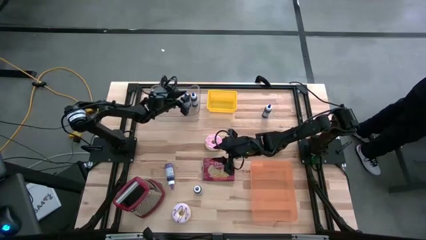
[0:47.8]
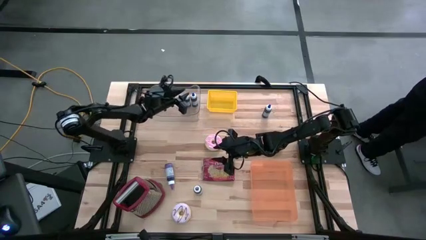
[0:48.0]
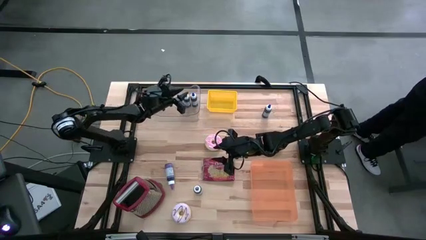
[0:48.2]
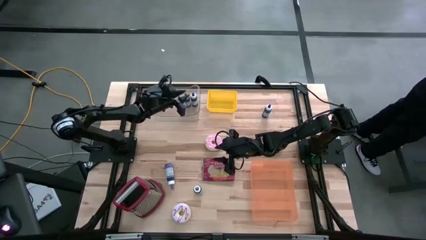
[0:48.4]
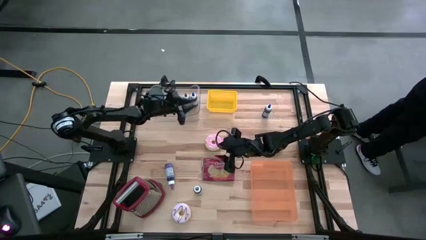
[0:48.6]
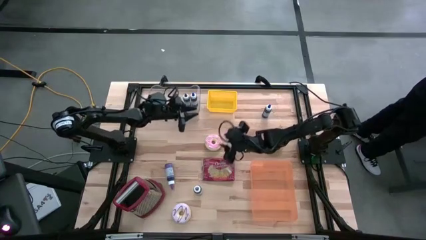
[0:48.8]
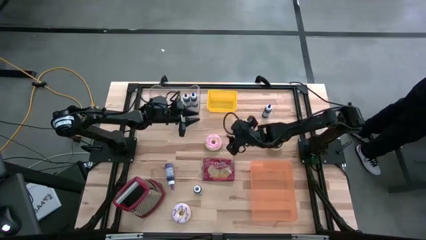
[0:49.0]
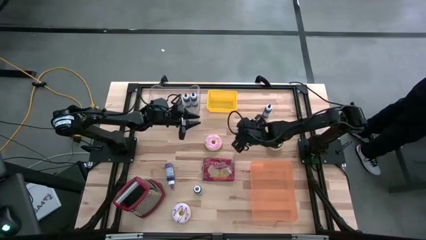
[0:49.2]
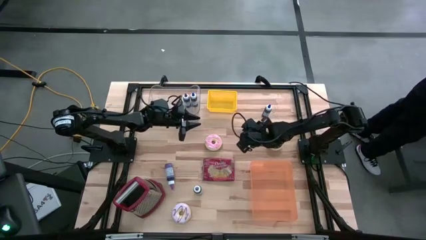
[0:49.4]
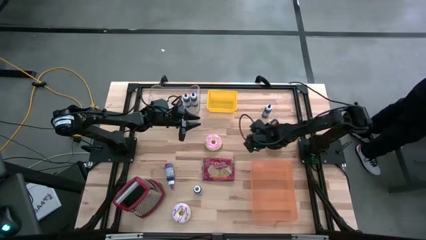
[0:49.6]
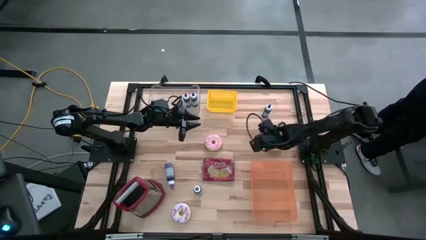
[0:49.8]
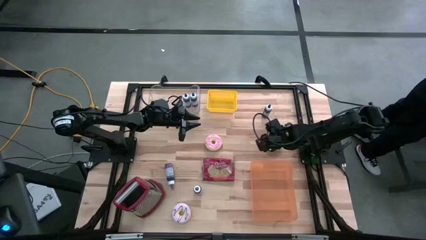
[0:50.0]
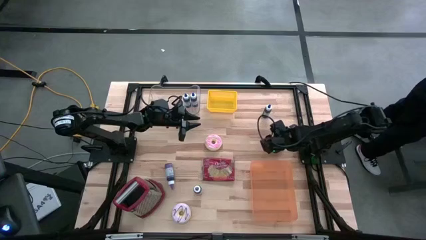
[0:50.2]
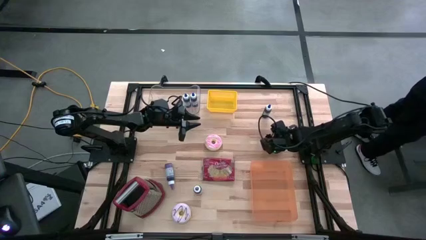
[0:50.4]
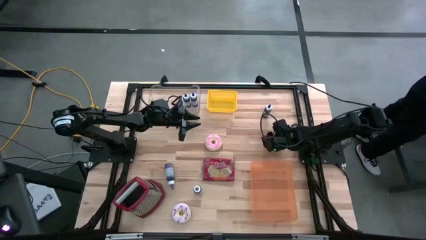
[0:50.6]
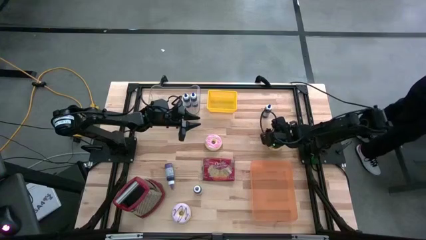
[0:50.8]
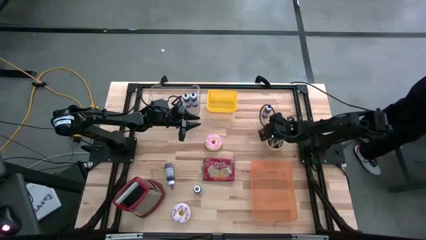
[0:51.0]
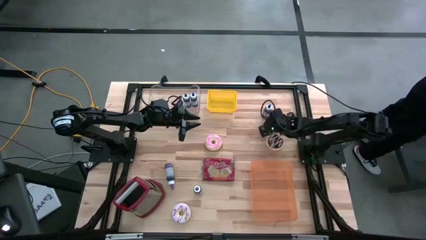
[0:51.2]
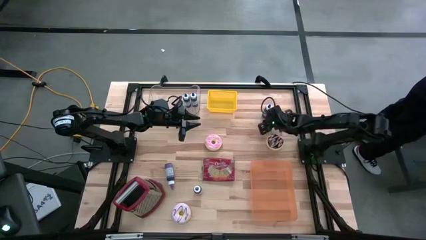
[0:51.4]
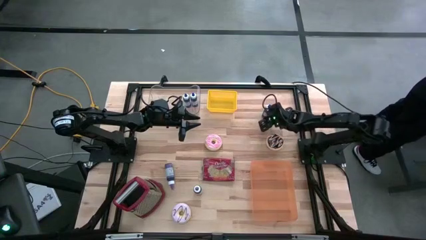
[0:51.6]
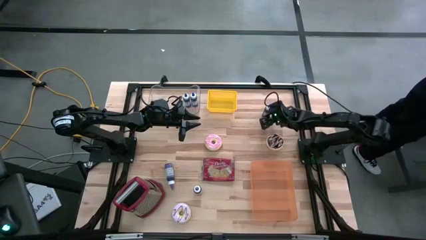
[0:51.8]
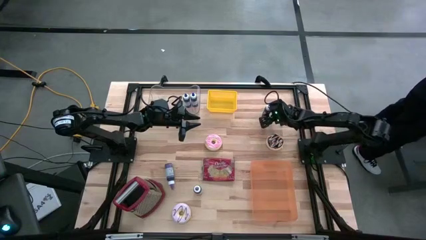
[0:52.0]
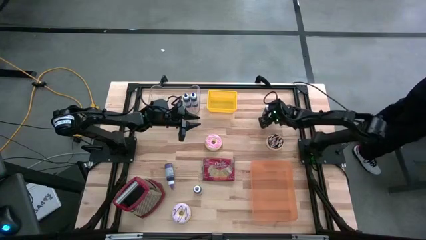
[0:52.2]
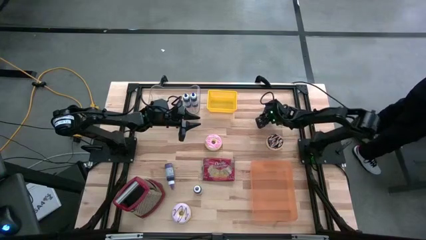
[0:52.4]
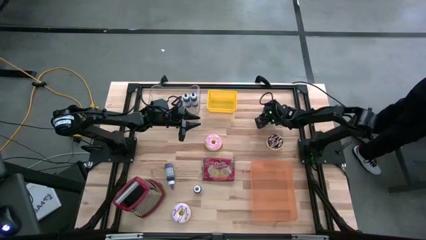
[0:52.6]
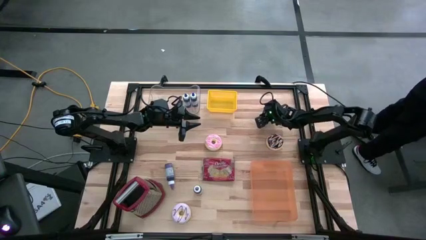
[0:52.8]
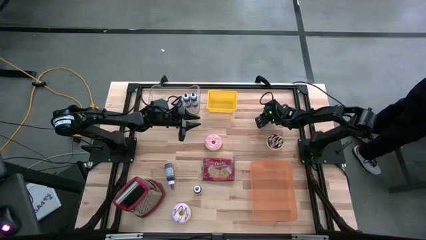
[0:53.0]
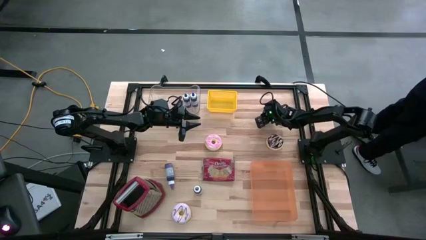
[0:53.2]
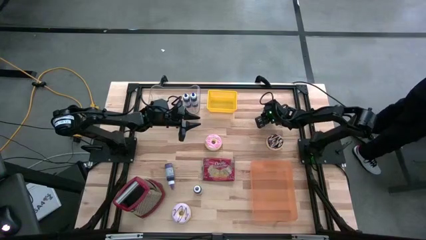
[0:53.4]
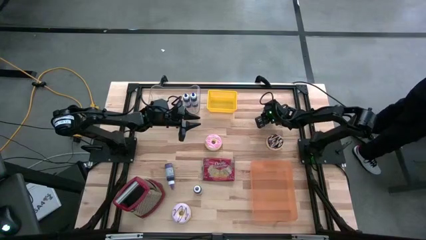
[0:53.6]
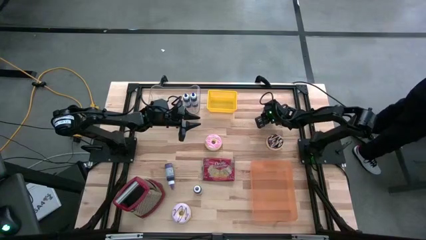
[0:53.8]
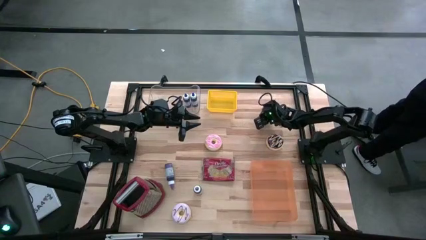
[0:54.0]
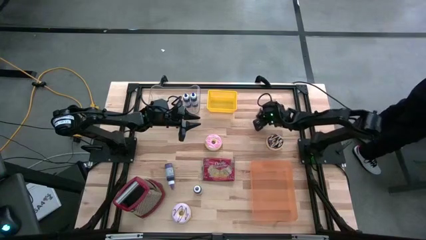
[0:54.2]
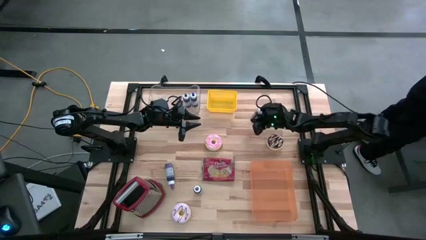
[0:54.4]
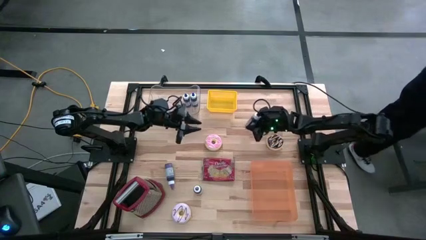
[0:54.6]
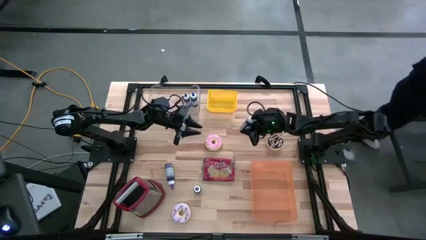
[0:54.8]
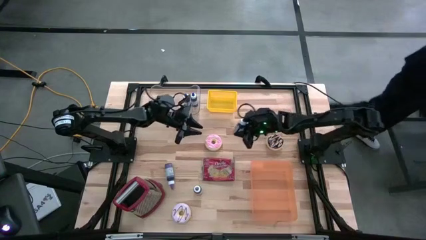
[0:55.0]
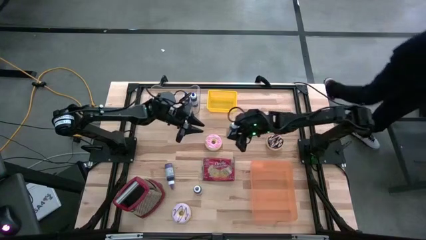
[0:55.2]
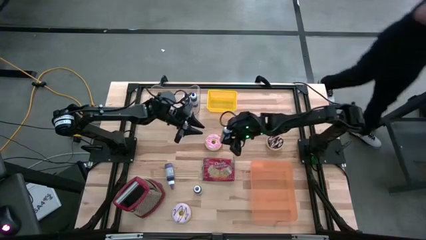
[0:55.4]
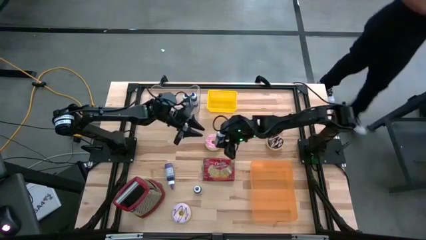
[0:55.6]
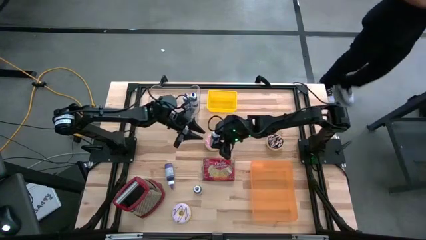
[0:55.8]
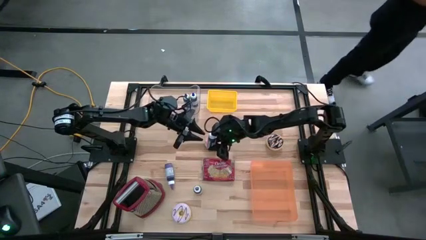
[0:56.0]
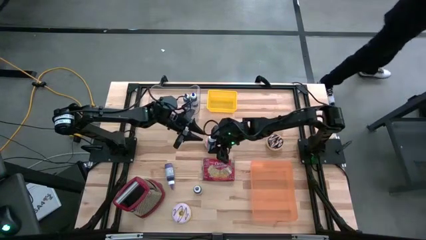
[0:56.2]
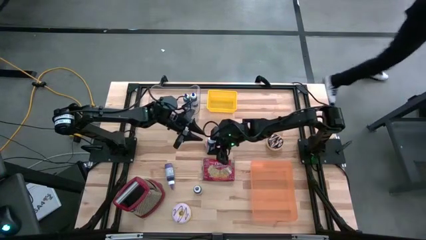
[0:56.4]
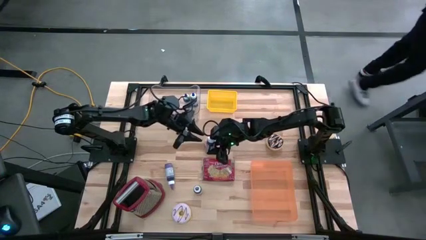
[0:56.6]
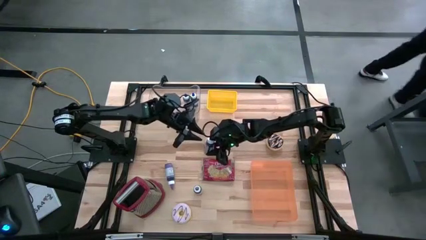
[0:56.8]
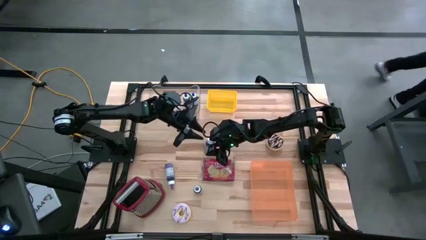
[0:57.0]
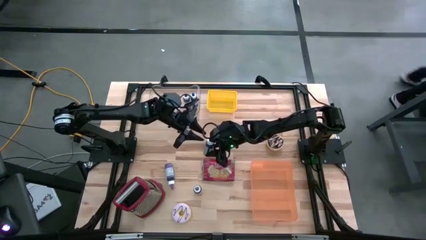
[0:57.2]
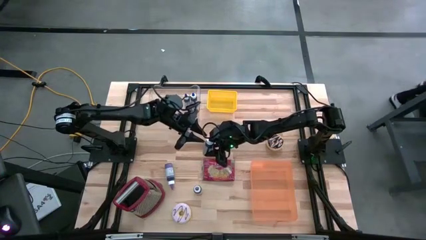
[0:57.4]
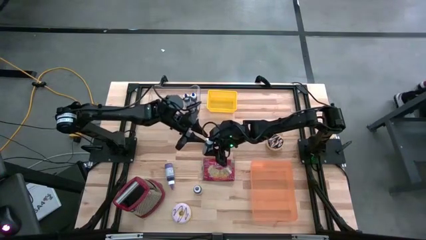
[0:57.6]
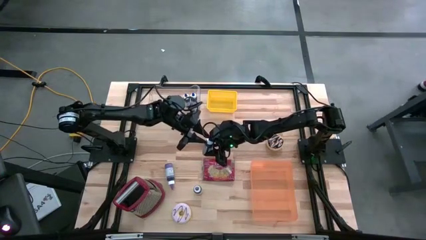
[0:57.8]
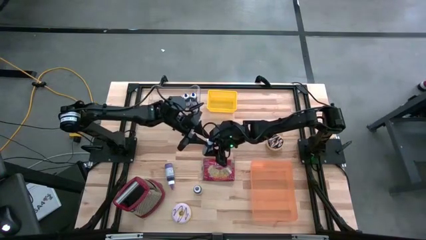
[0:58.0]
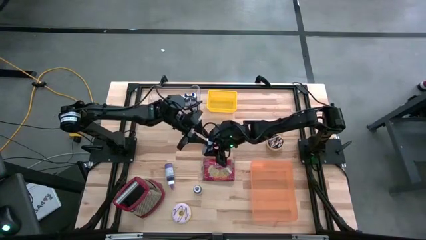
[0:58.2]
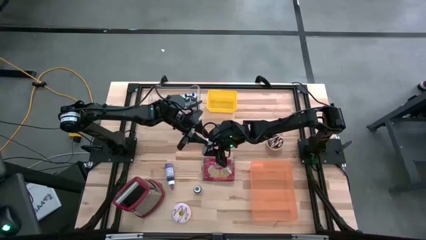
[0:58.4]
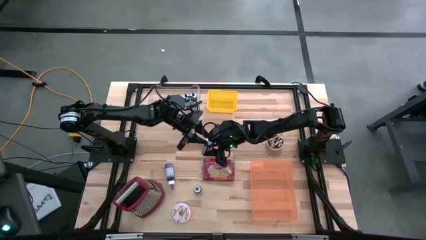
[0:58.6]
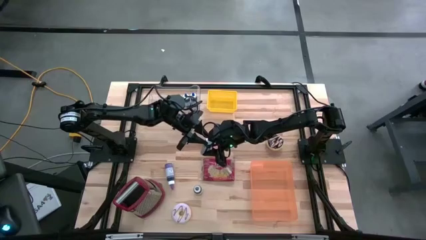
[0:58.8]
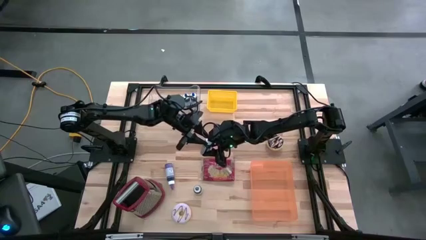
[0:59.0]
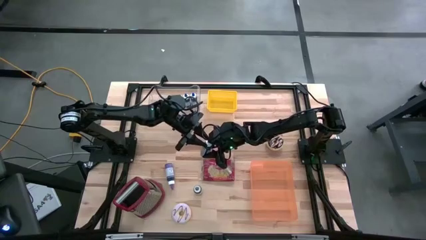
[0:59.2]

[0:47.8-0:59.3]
Put the blue food coloring bottle into the transparent bin

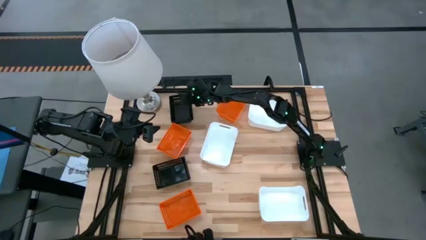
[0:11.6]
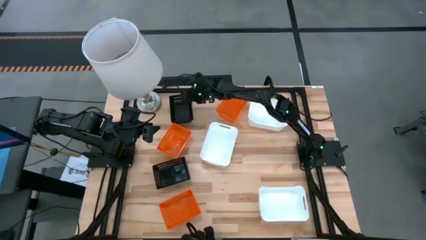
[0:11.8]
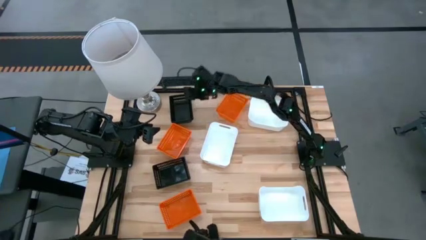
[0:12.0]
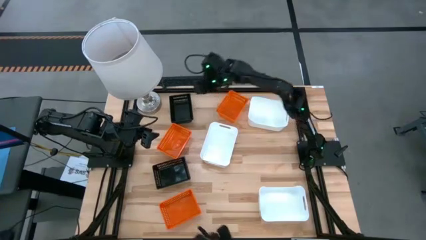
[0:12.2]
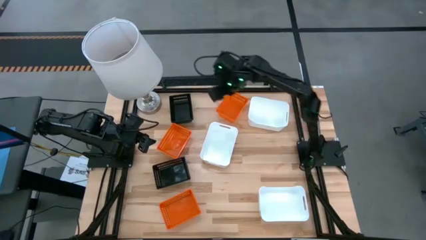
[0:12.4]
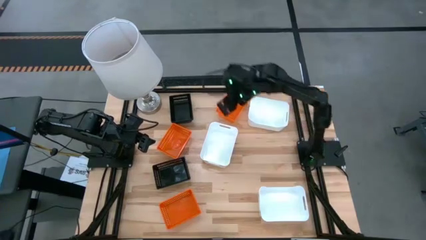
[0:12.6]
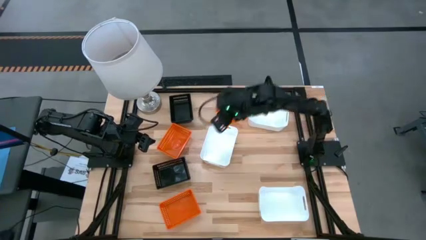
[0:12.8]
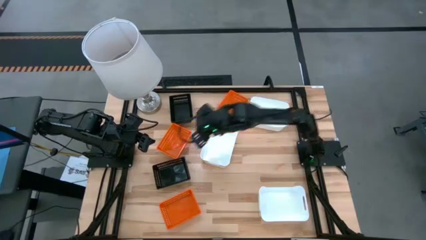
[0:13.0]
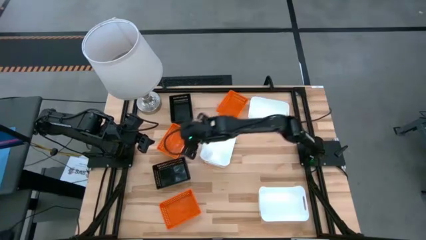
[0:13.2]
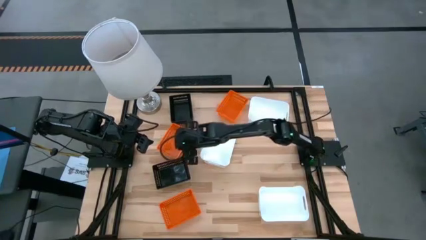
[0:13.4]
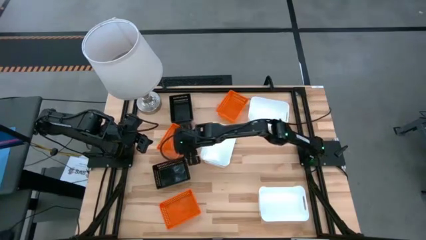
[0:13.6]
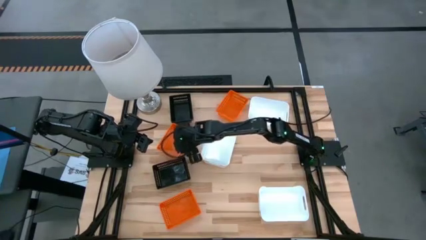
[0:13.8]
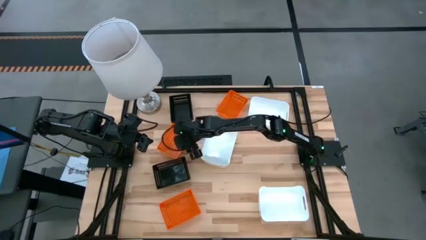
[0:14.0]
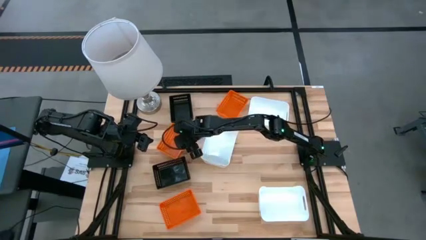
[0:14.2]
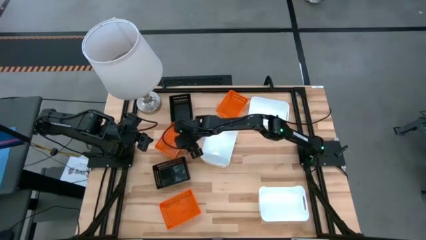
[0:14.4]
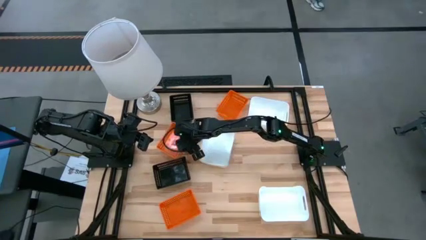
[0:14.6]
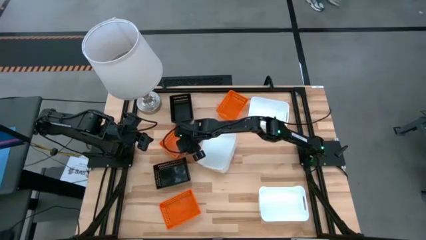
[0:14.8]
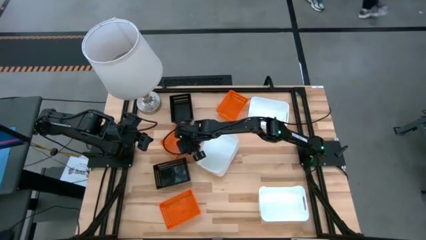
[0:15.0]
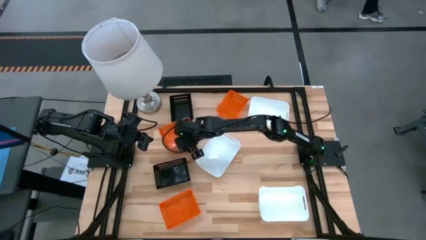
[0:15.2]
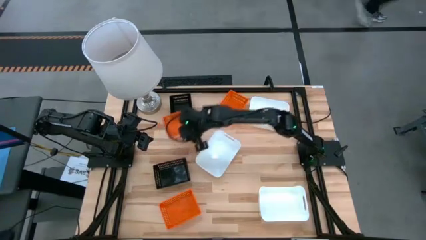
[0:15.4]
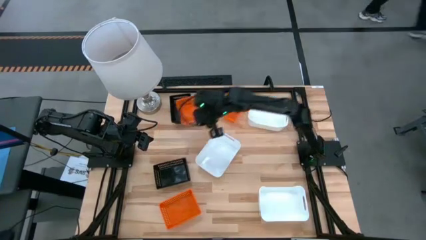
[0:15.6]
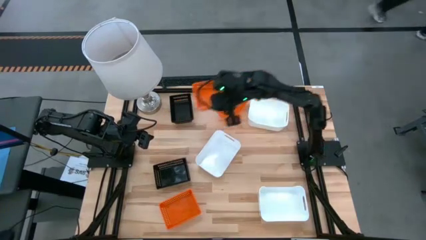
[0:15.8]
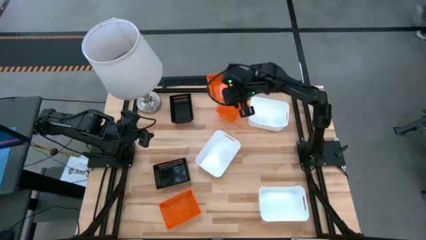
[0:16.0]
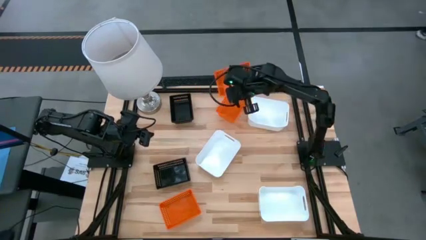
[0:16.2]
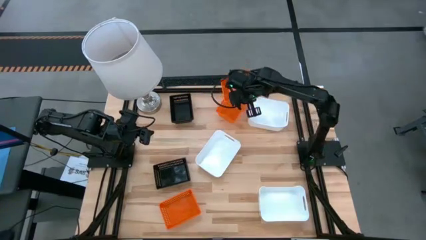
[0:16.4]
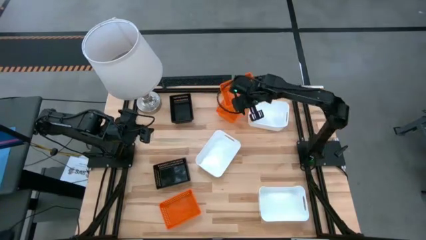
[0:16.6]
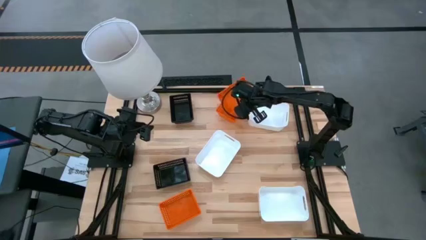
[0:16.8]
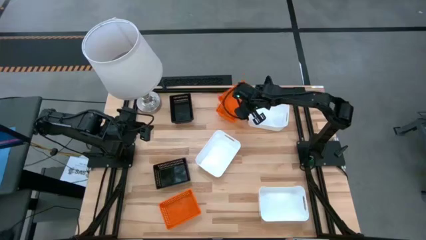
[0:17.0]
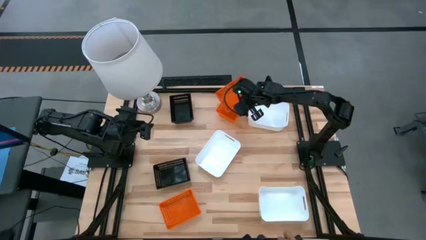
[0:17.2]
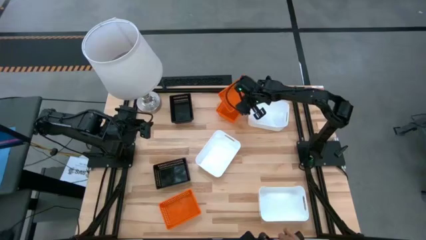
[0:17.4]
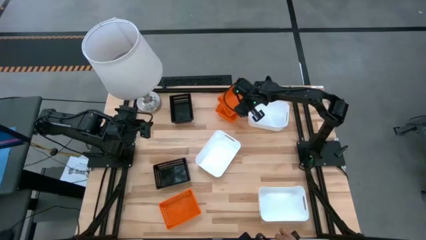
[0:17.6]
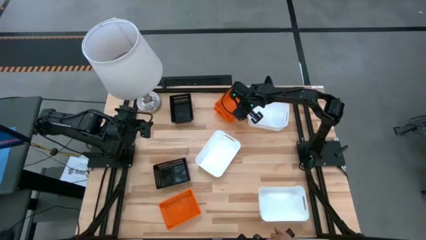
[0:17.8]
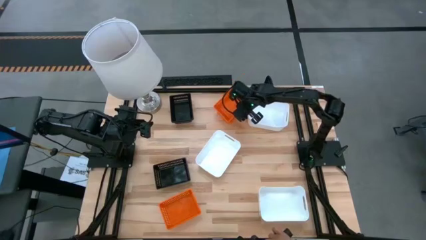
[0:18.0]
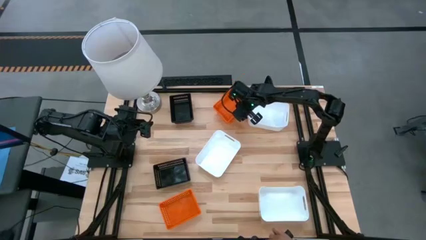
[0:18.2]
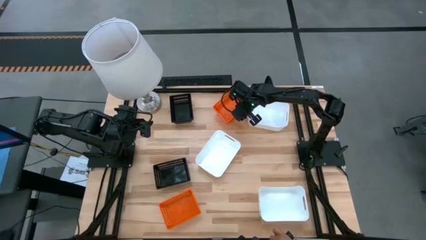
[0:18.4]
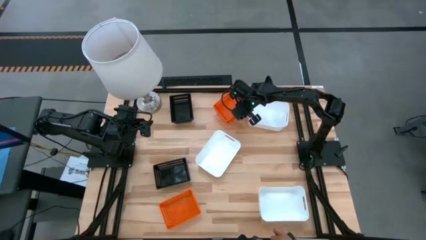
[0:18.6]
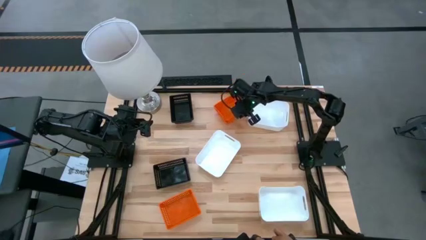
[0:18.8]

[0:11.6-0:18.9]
Stack the middle orange bin on top of the top orange bin
